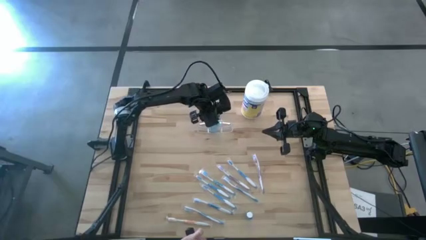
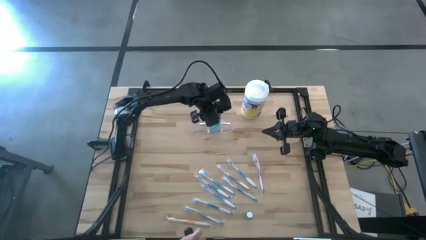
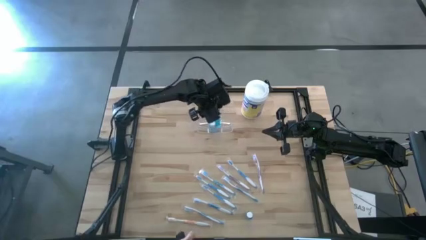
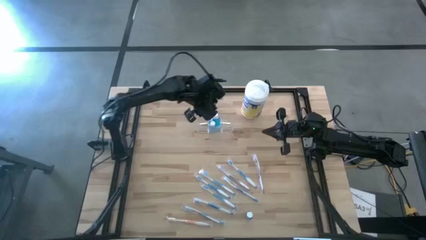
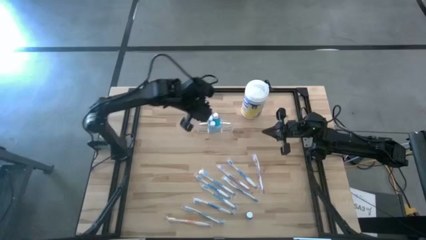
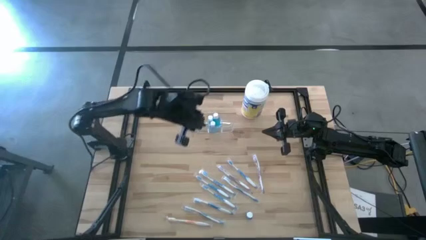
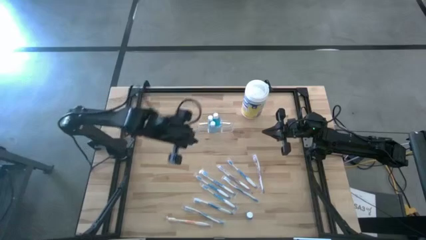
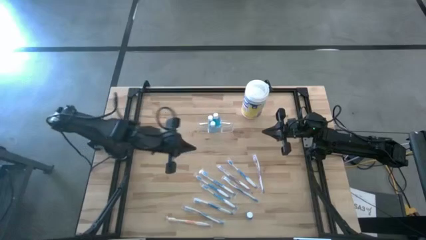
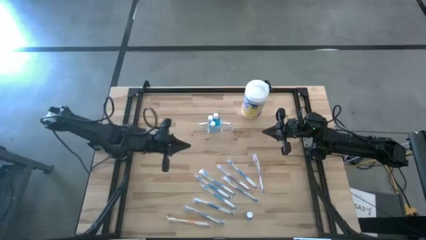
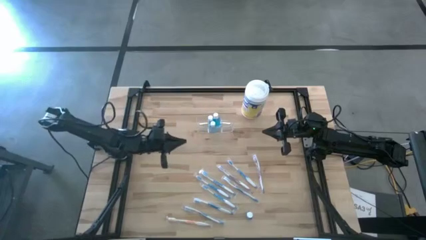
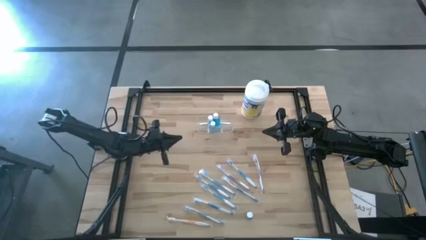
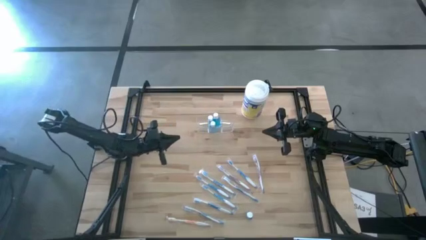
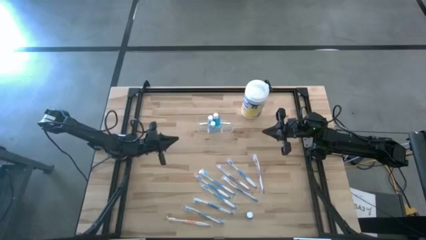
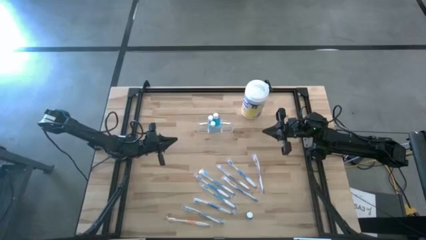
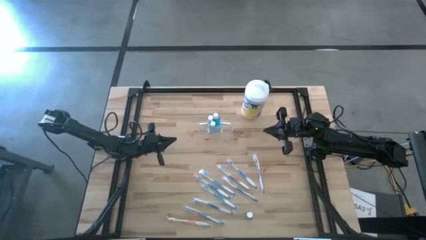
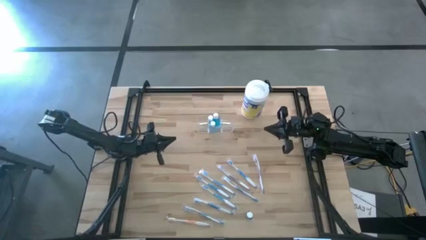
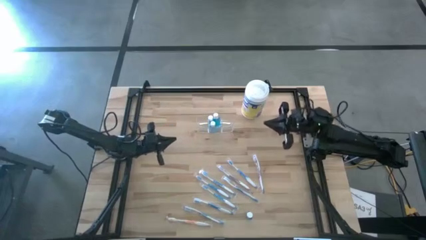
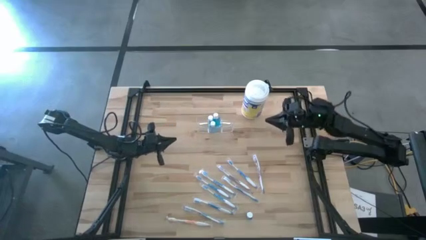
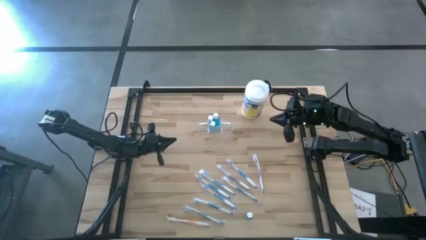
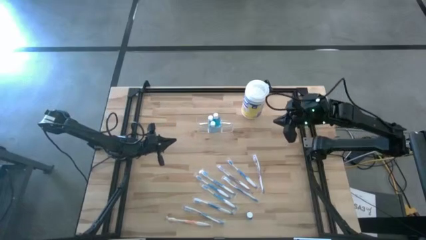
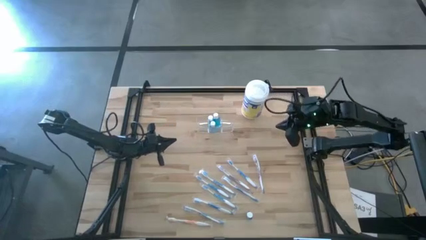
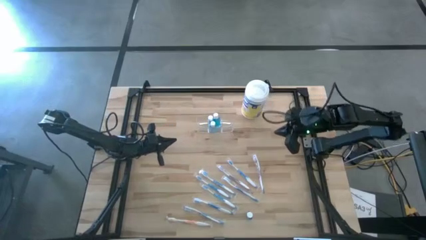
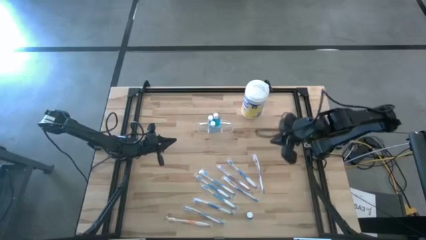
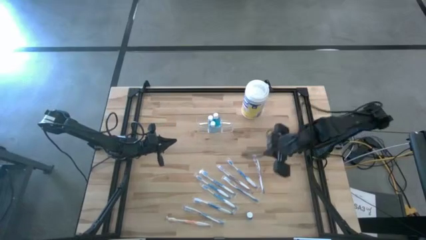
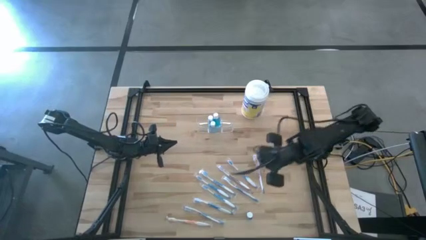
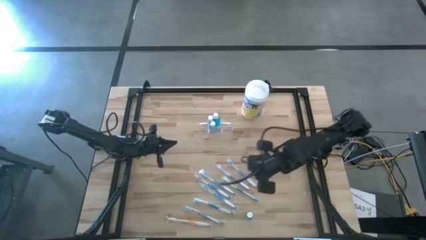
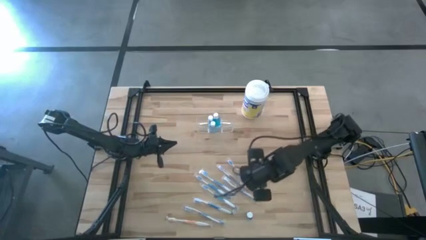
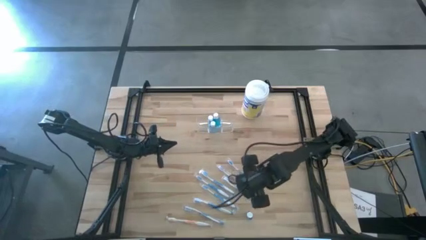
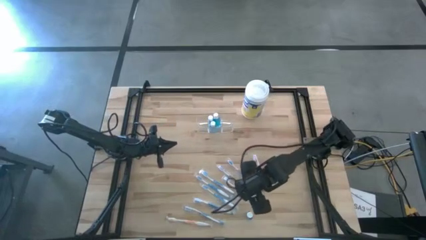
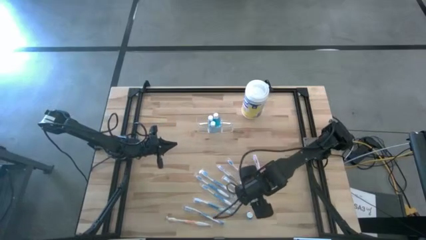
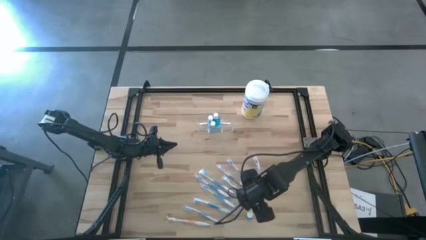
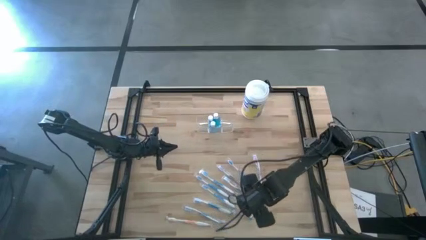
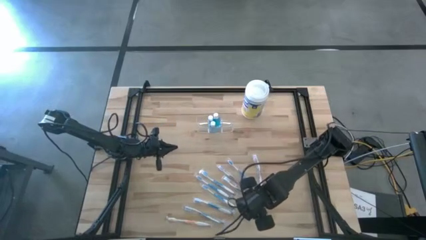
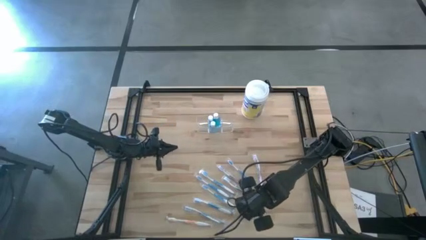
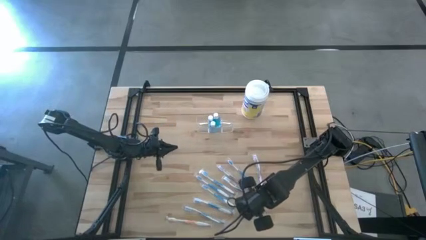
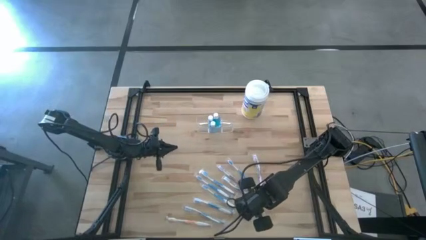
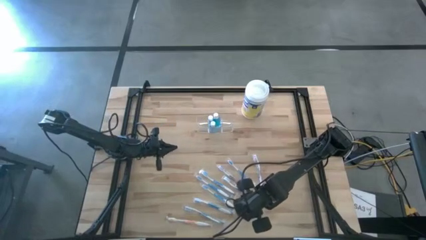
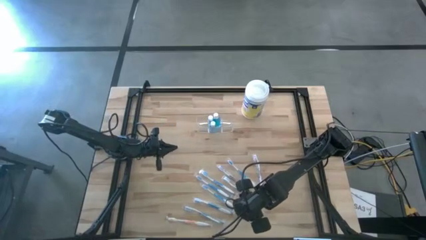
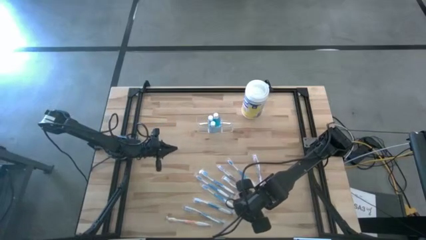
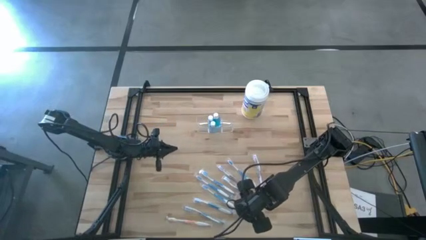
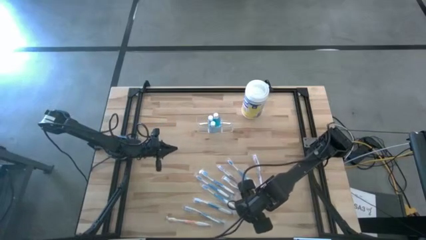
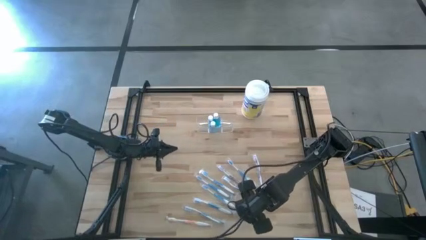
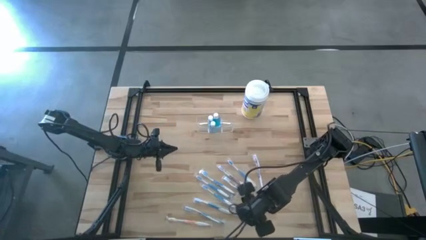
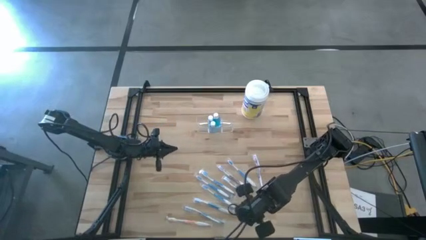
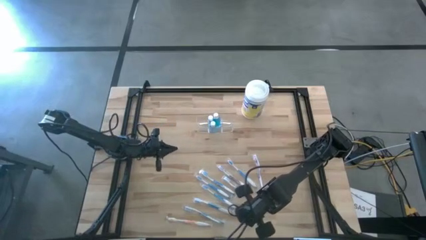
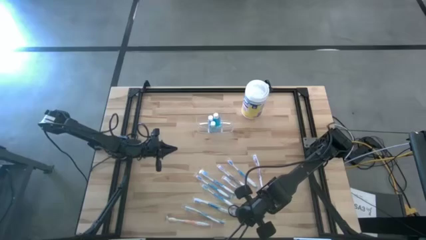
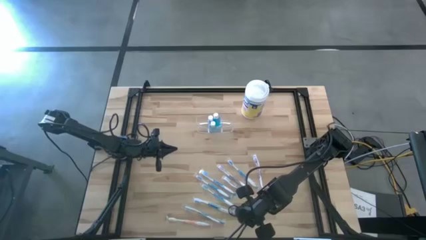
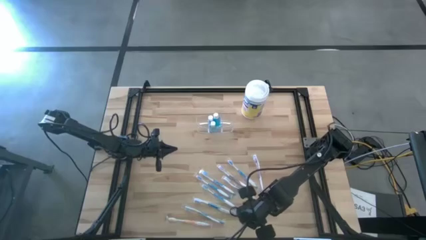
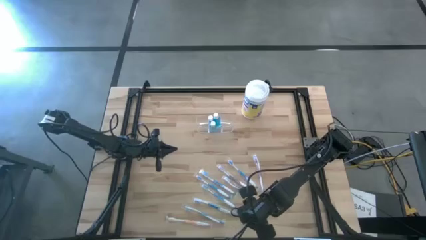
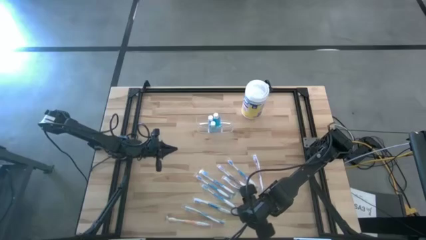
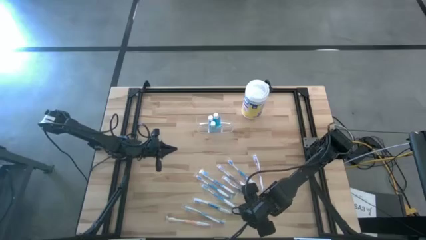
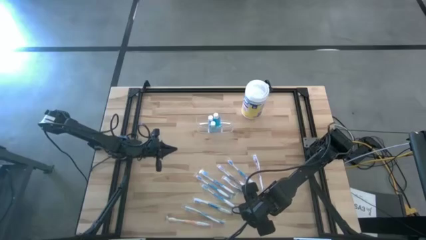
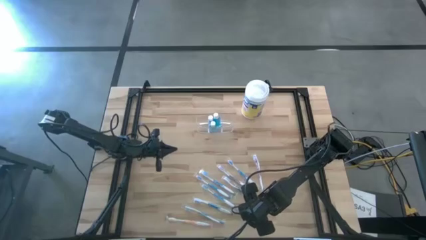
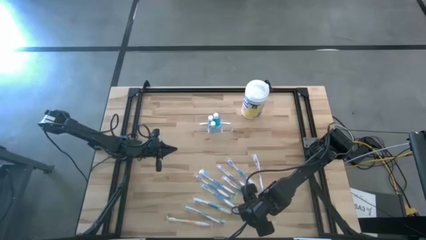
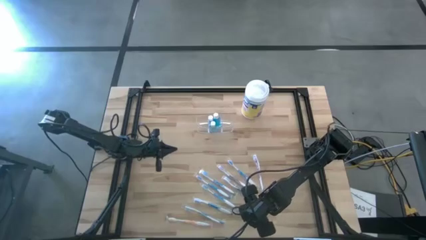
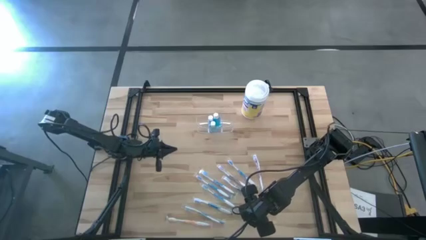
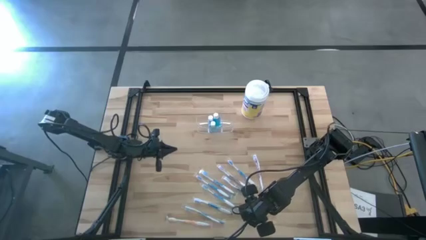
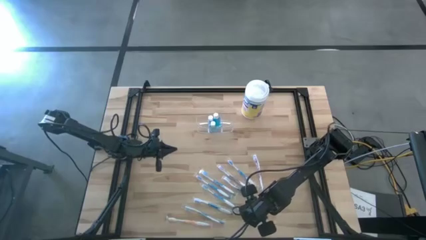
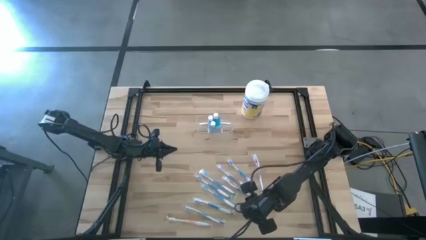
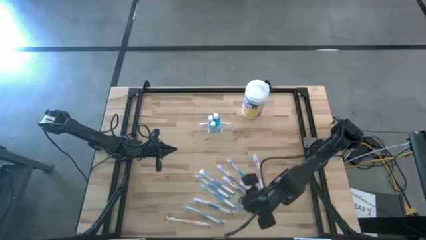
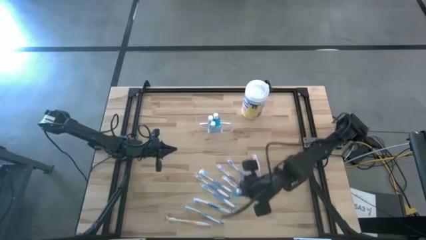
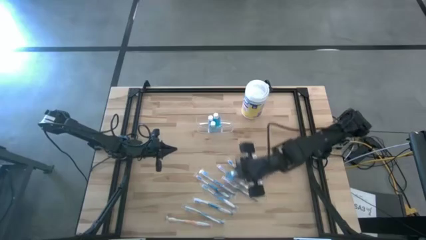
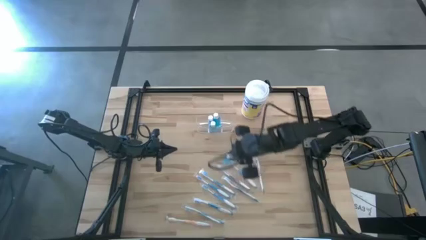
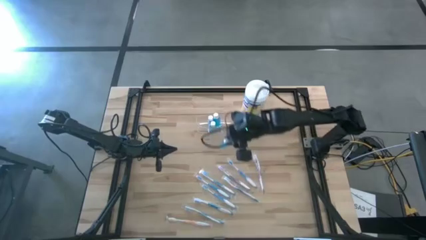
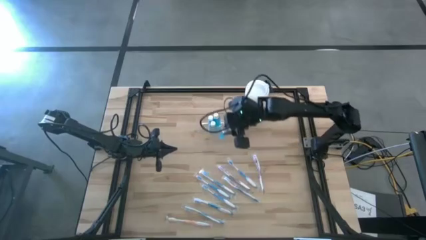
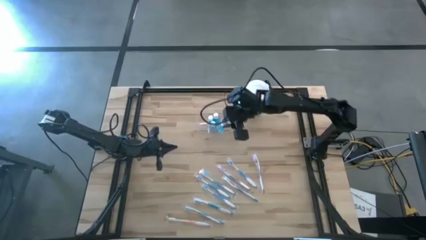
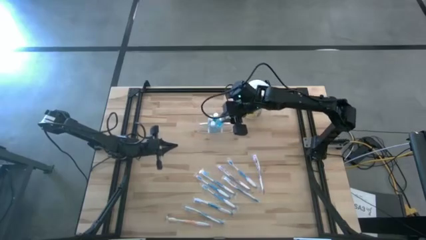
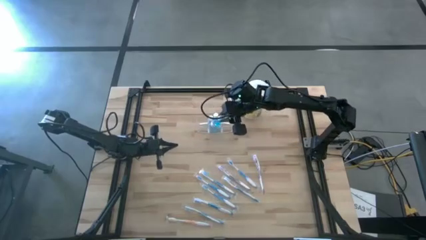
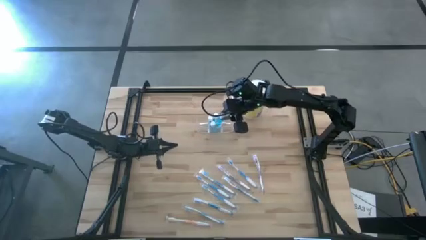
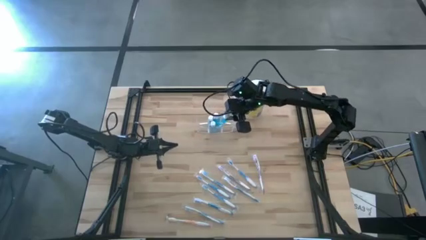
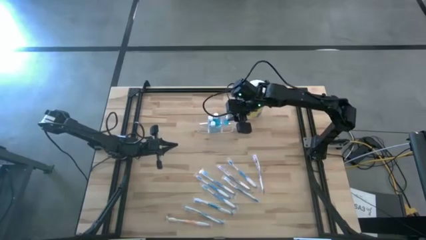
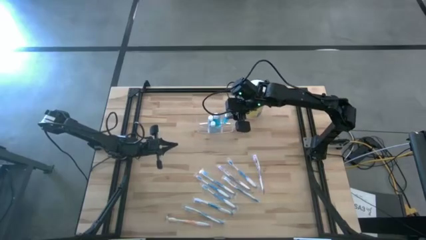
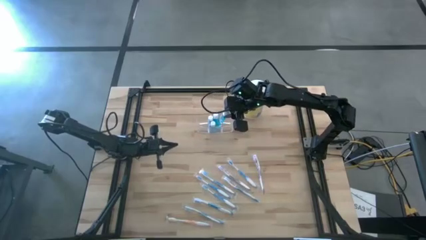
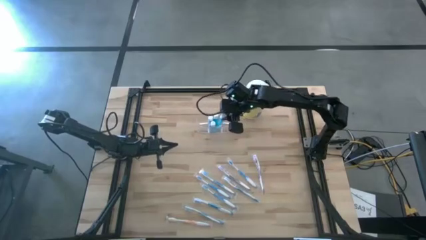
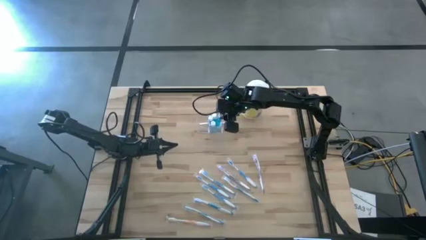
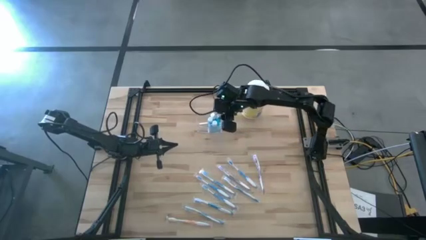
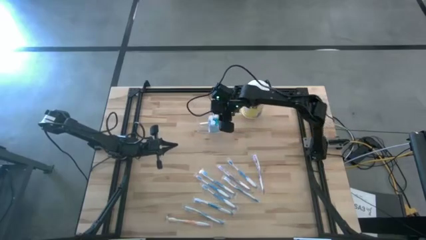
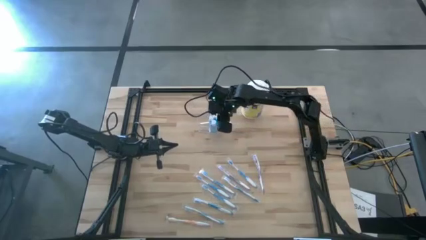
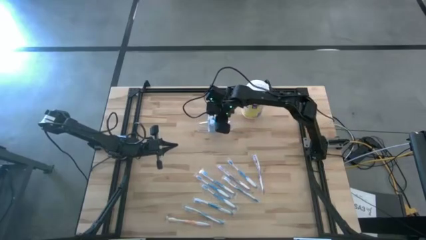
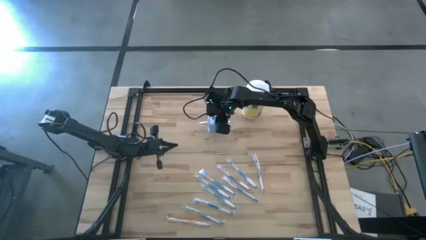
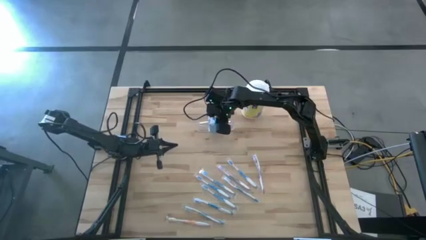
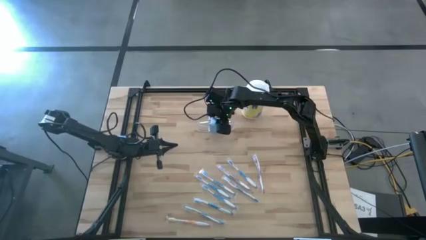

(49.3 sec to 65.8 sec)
Task: Pick & Place toothbrushing station
Put the blue mouthwash into the middle section of the transparent organizer
